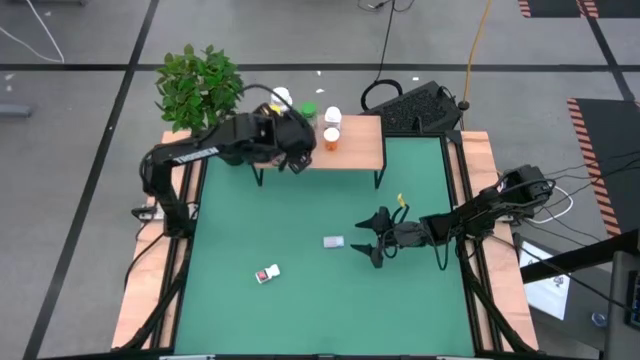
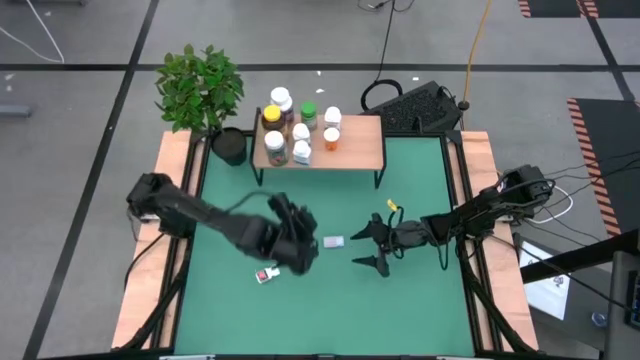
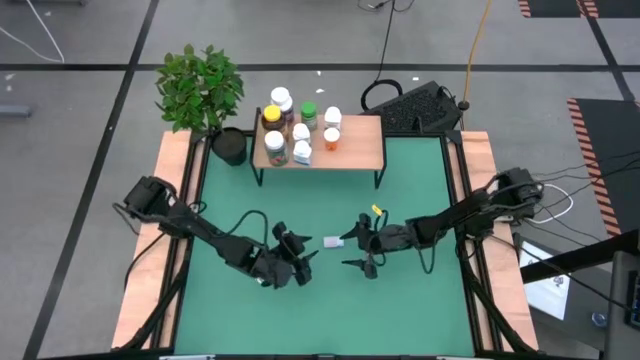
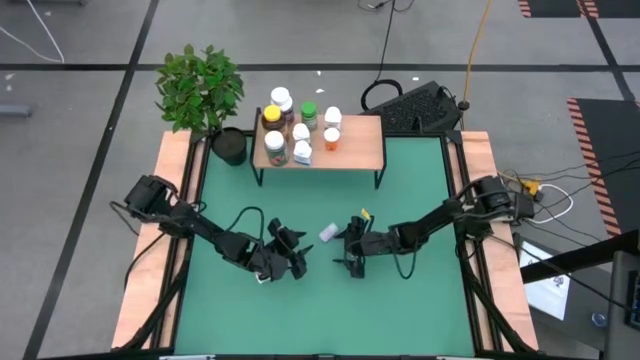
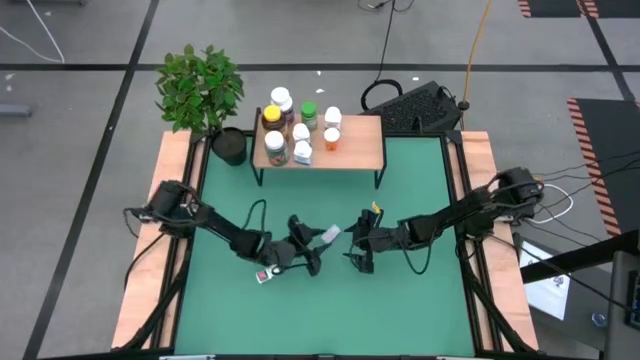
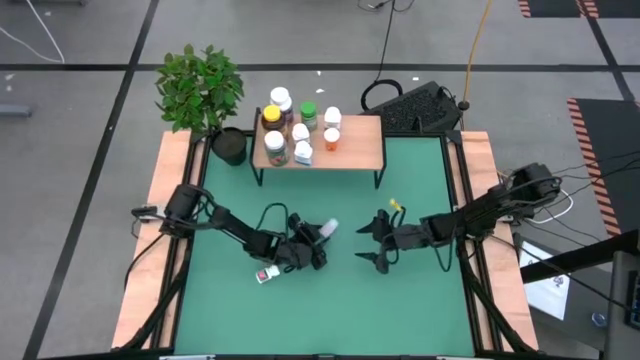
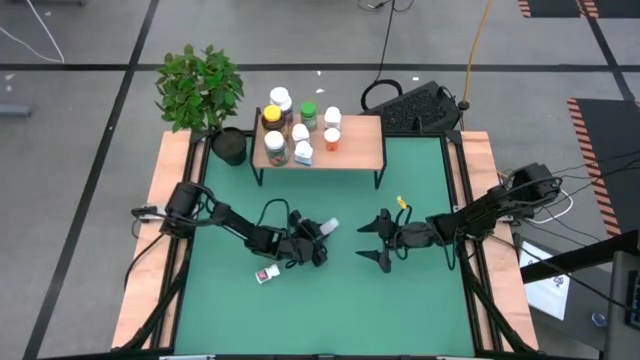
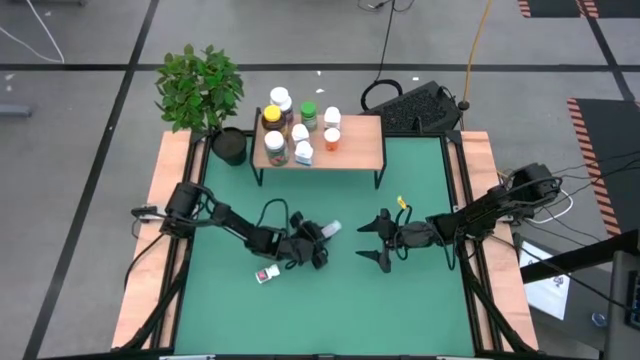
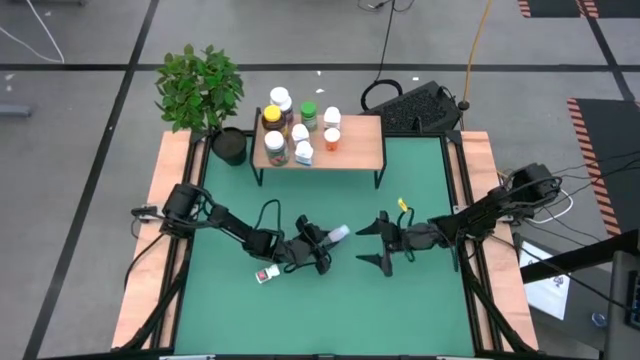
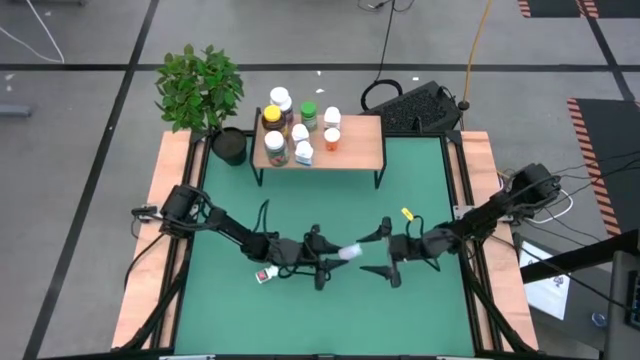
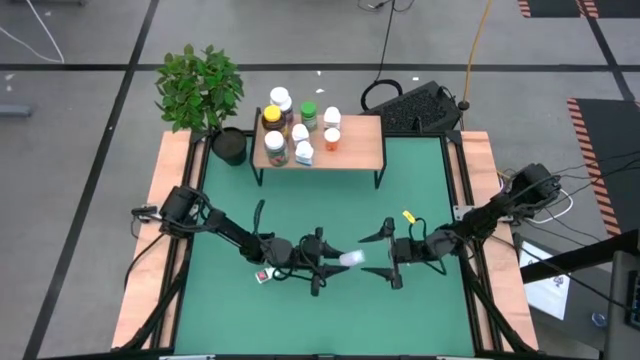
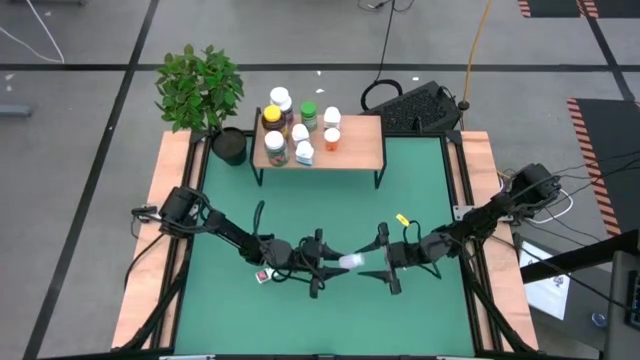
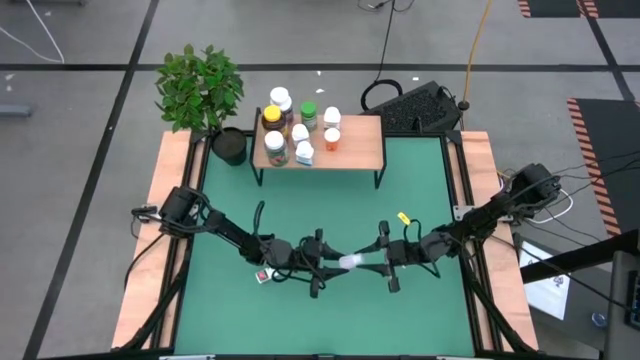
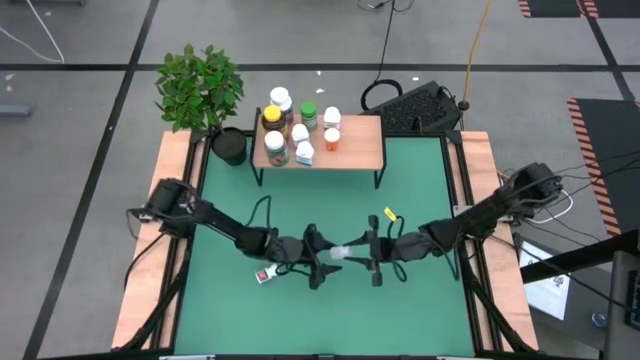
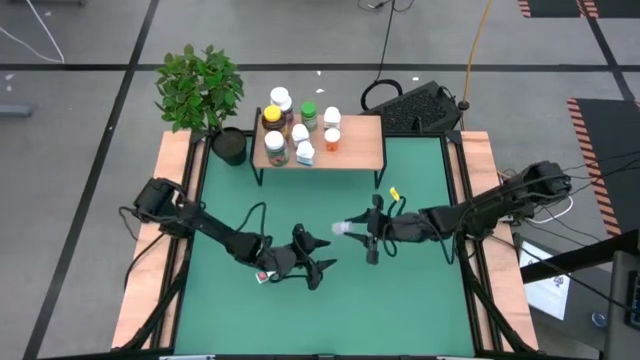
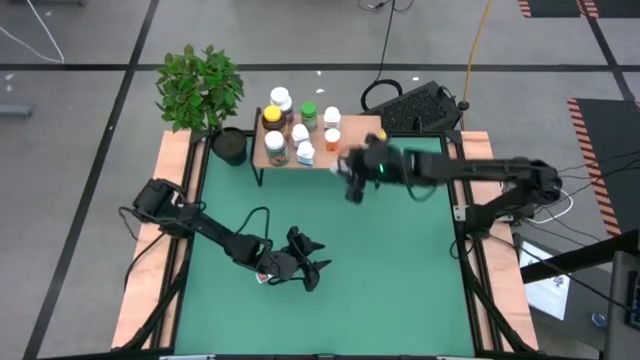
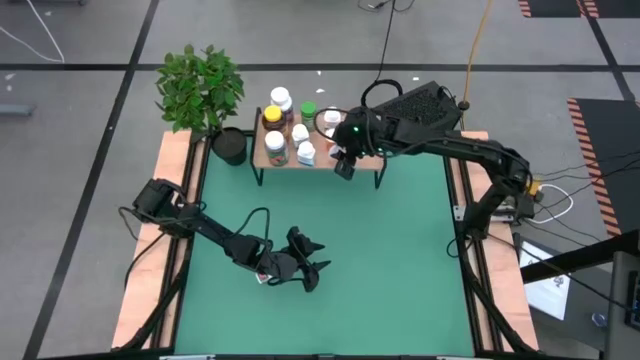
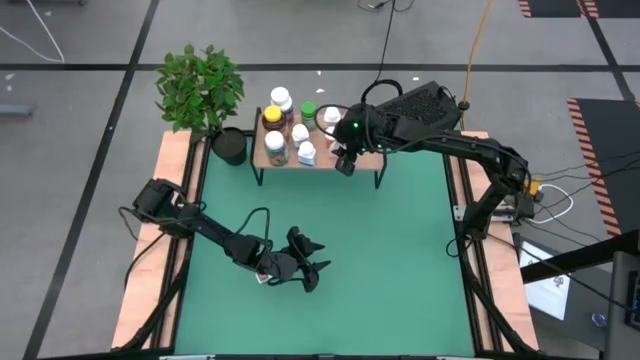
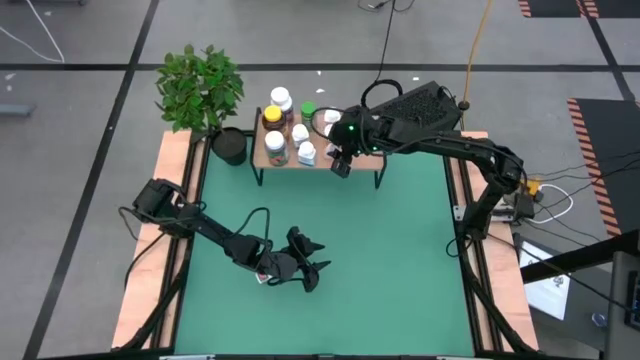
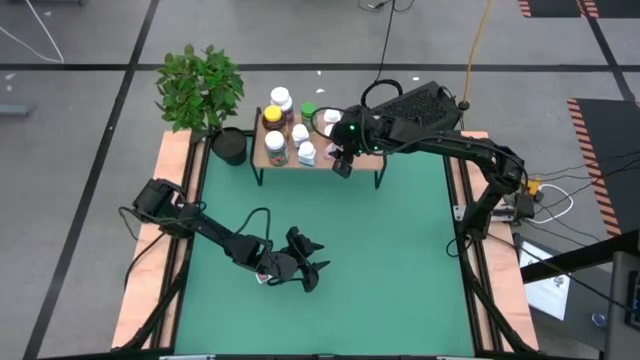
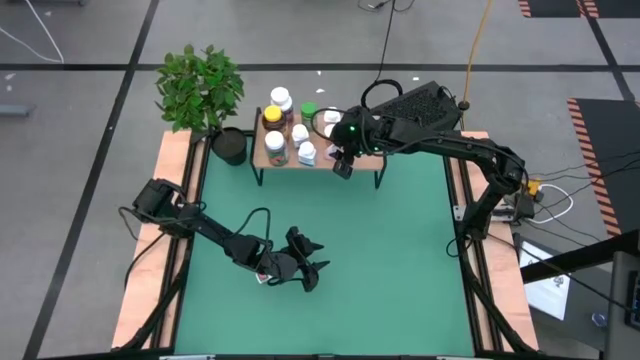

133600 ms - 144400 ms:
Task: Pick and place medicine bottles onto shelf by color
Put the transparent pill bottle on the shelf

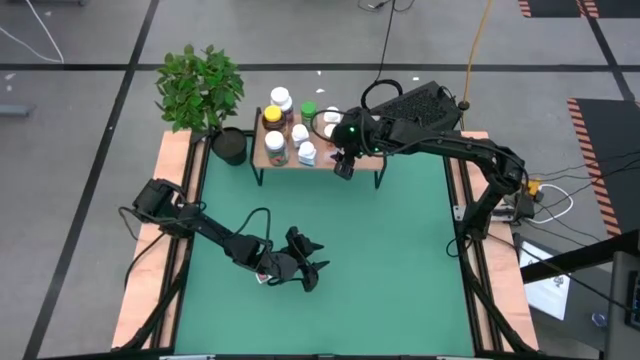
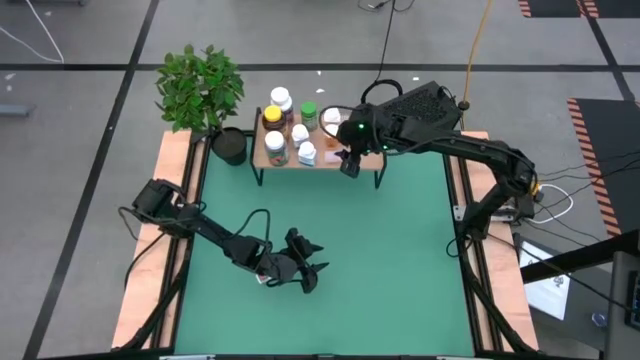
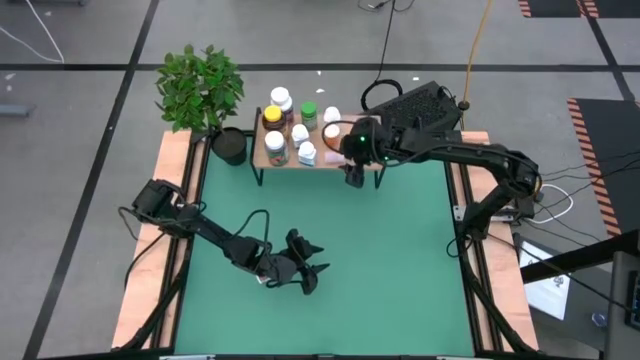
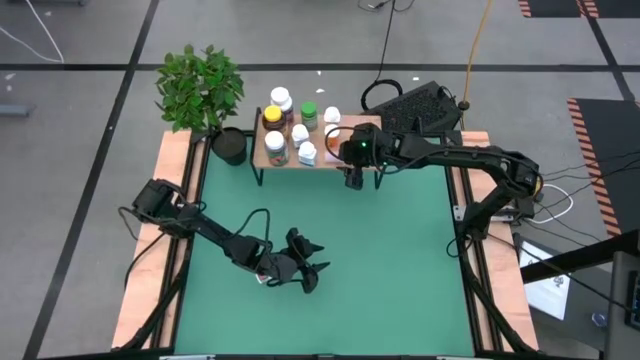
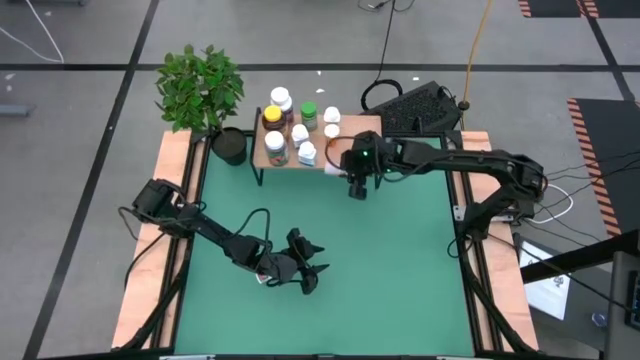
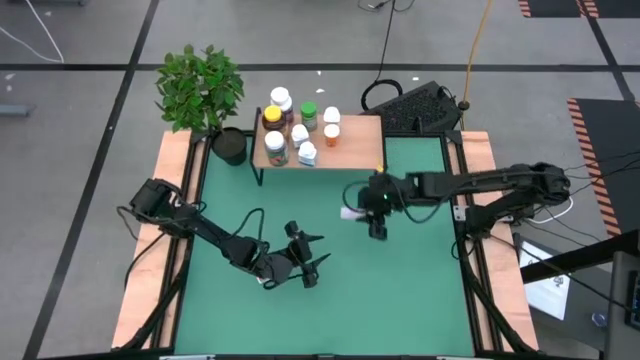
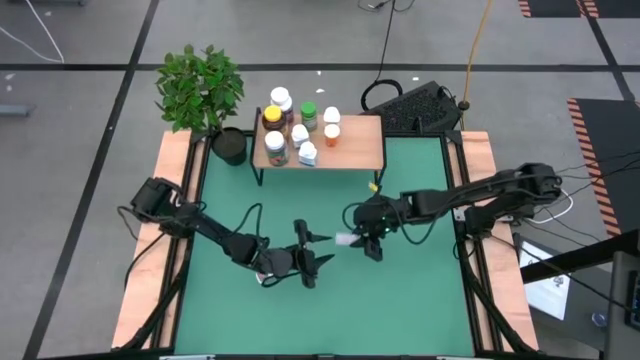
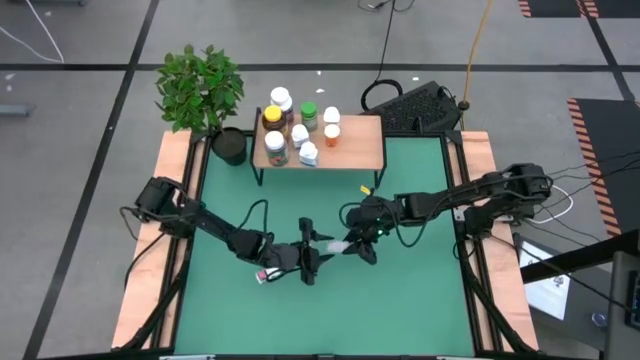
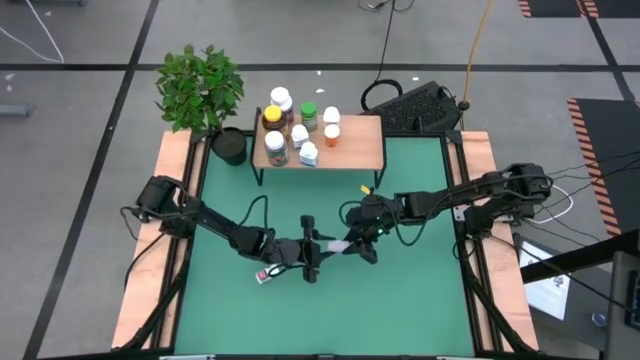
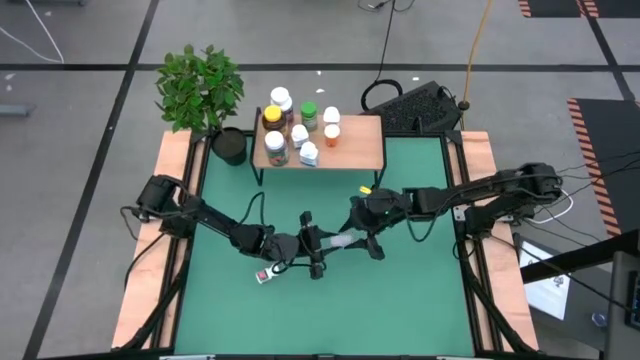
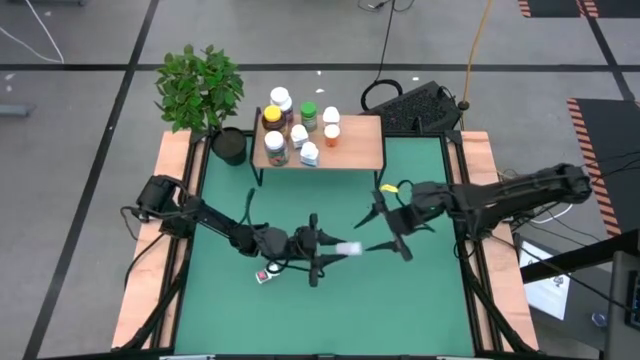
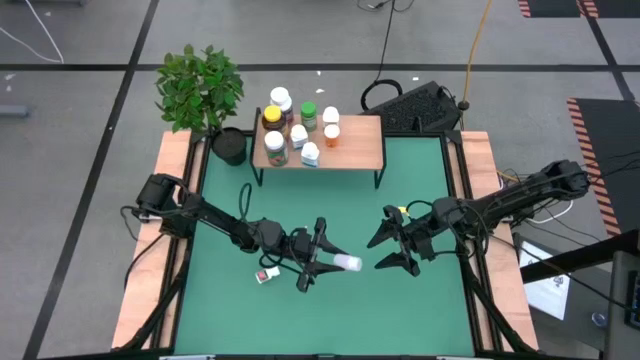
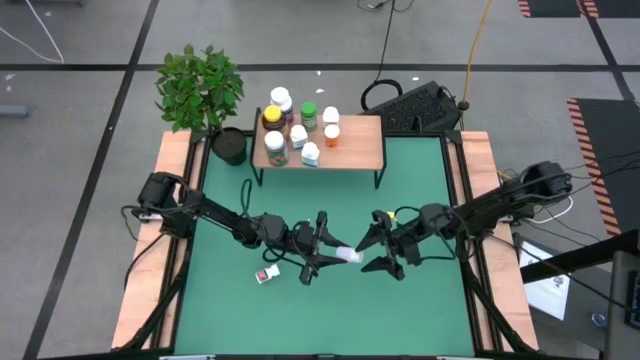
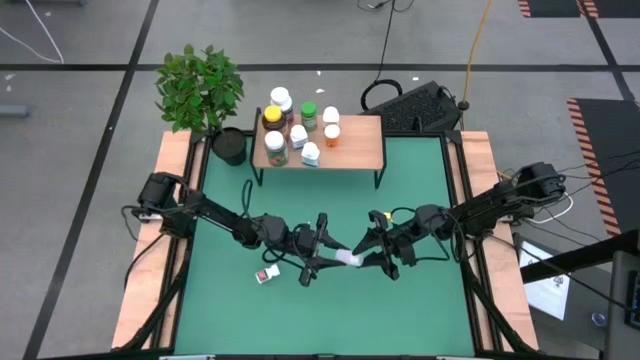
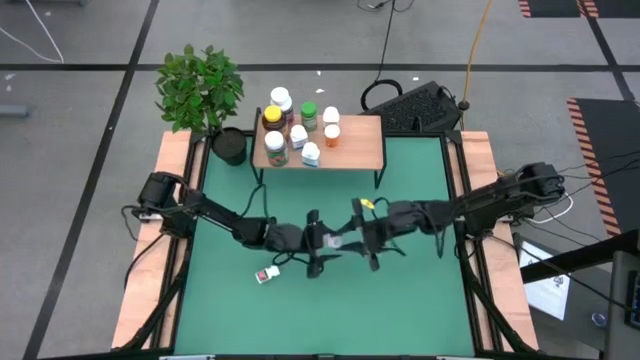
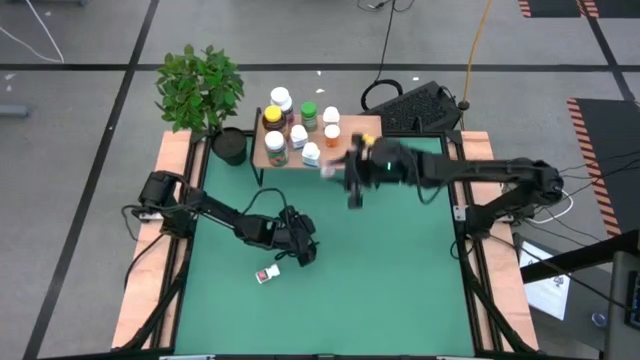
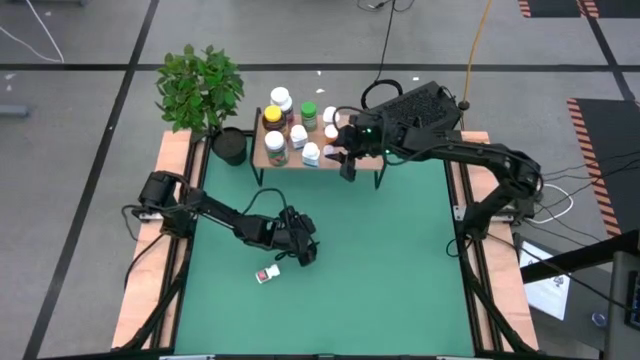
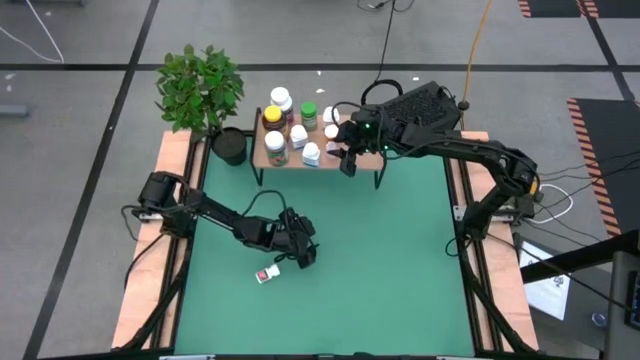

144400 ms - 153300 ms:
Put the transparent pill bottle on the shelf

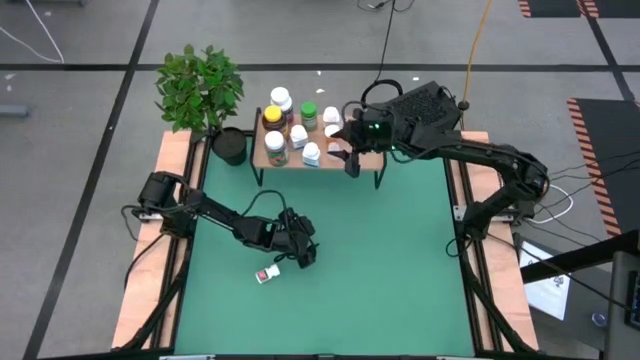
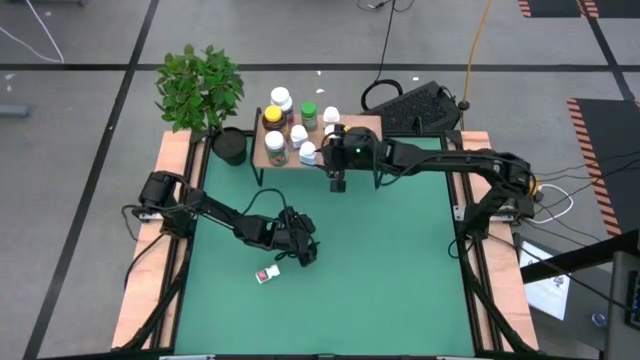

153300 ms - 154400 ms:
Adjust the small bottle pill on the shelf
